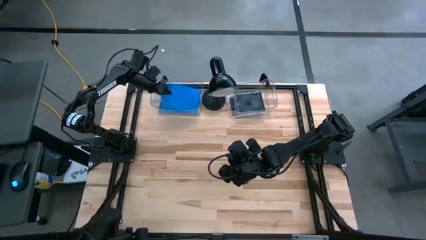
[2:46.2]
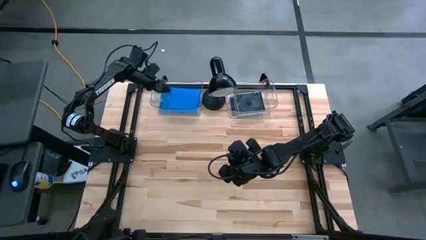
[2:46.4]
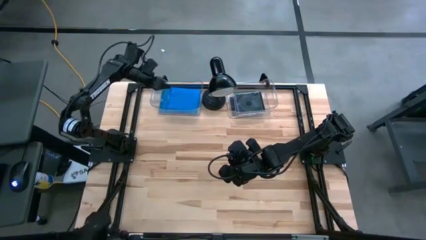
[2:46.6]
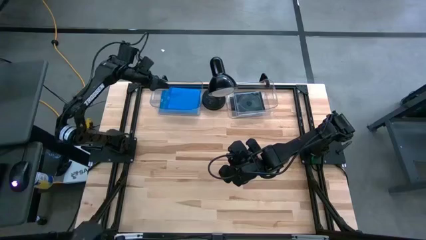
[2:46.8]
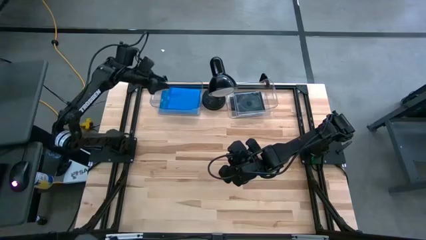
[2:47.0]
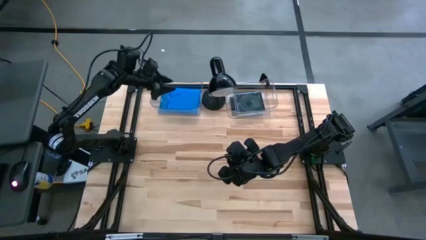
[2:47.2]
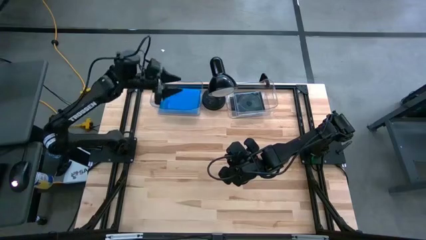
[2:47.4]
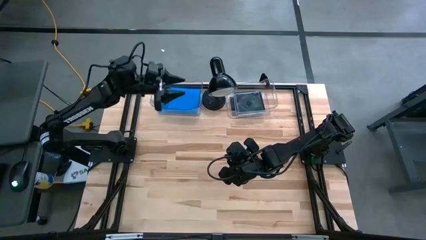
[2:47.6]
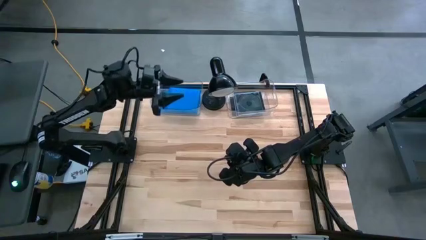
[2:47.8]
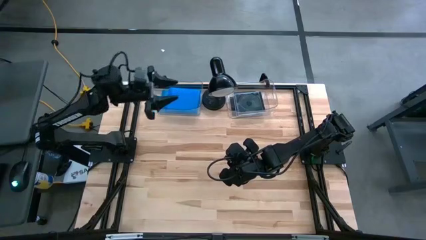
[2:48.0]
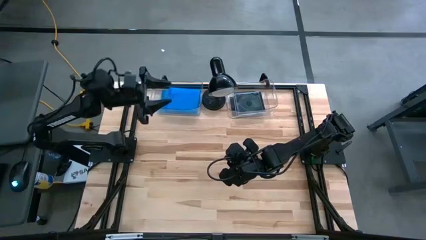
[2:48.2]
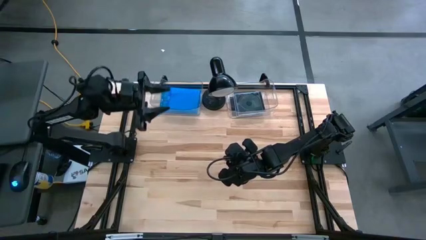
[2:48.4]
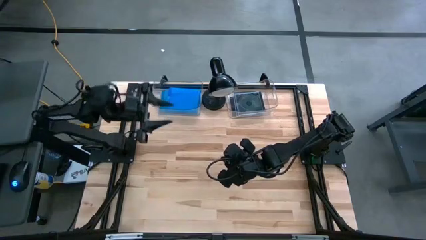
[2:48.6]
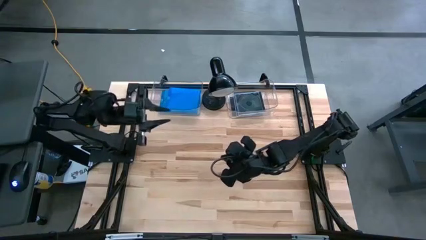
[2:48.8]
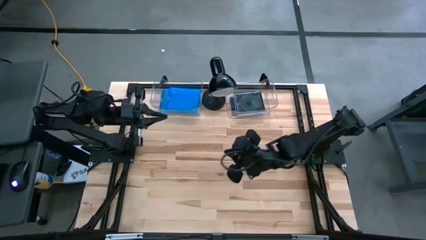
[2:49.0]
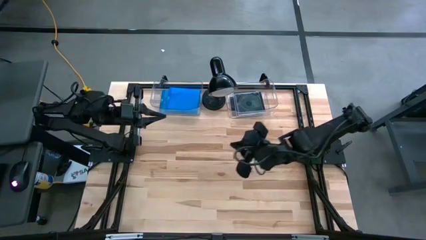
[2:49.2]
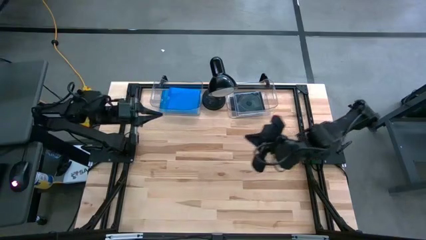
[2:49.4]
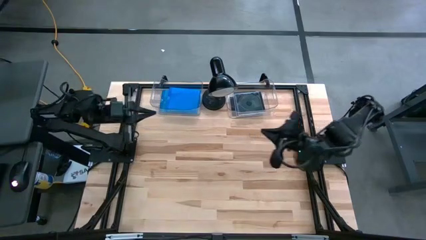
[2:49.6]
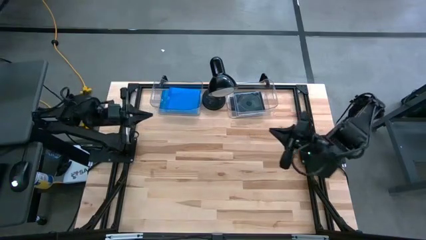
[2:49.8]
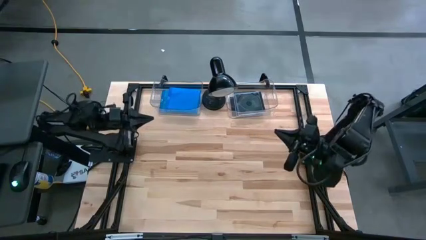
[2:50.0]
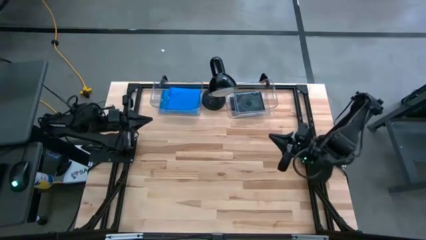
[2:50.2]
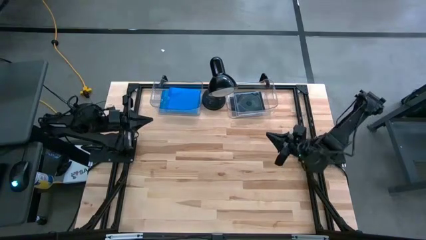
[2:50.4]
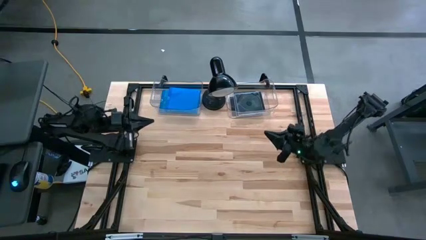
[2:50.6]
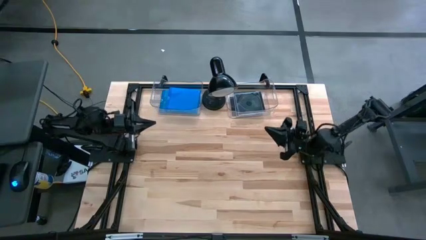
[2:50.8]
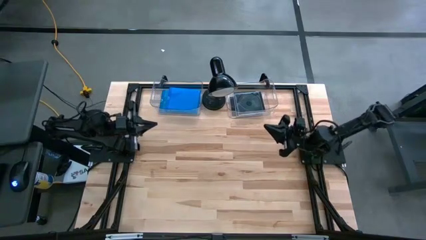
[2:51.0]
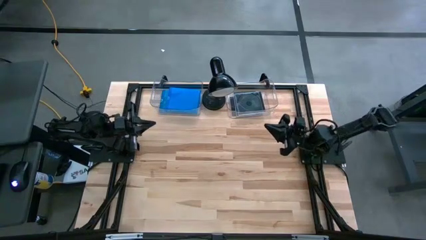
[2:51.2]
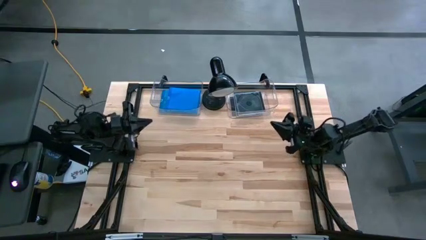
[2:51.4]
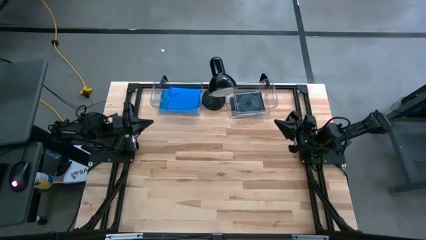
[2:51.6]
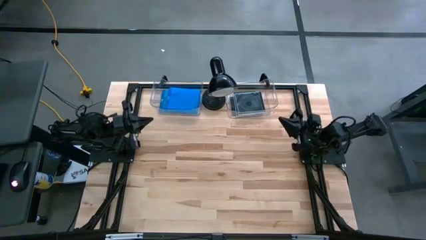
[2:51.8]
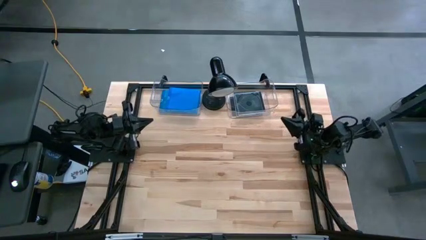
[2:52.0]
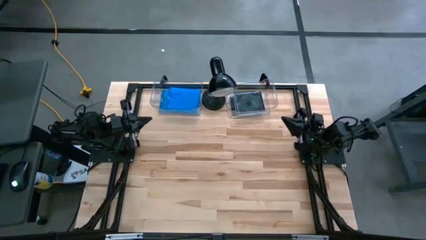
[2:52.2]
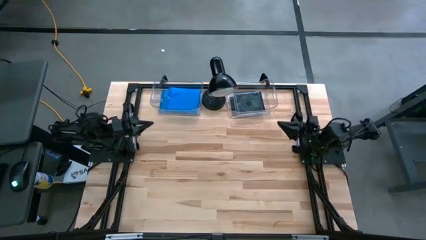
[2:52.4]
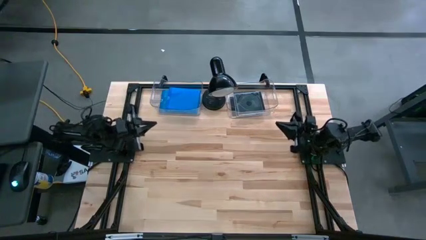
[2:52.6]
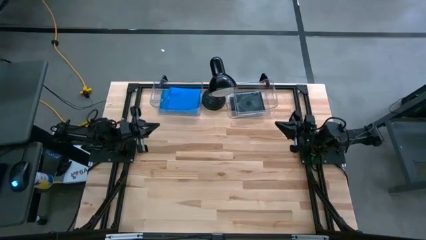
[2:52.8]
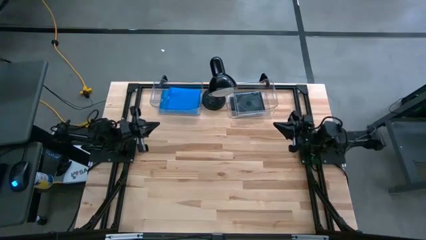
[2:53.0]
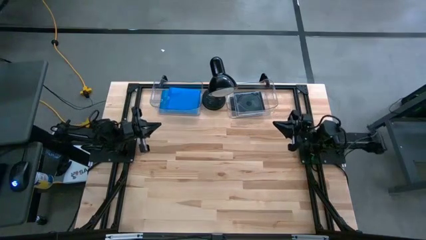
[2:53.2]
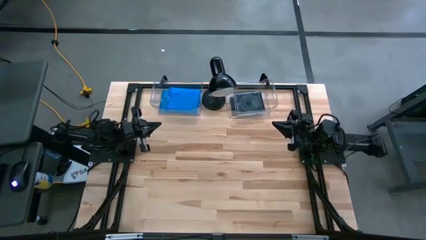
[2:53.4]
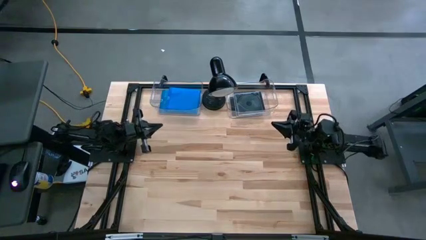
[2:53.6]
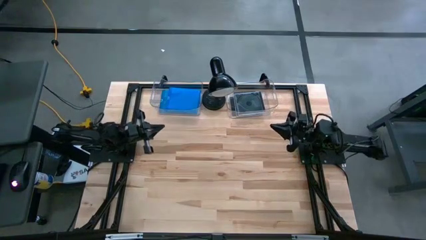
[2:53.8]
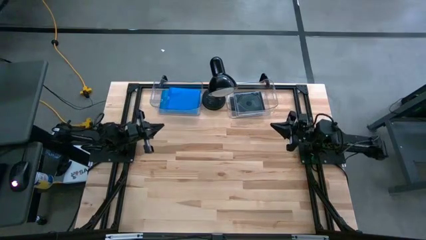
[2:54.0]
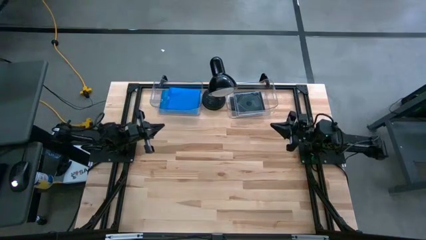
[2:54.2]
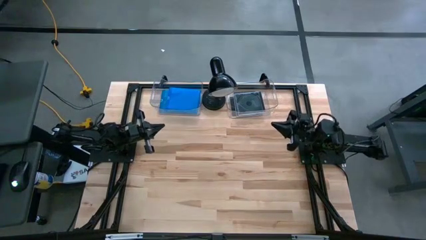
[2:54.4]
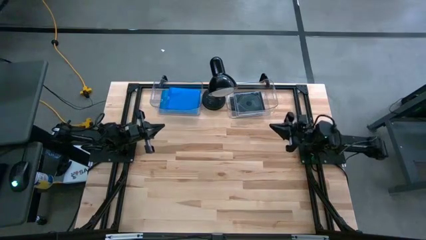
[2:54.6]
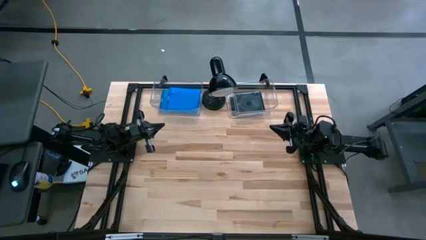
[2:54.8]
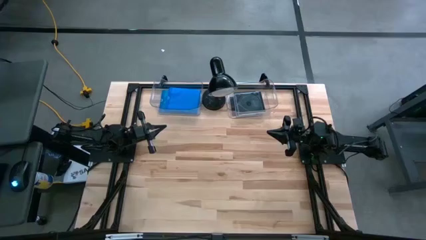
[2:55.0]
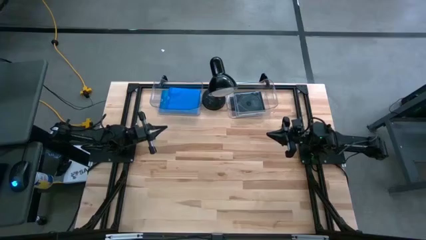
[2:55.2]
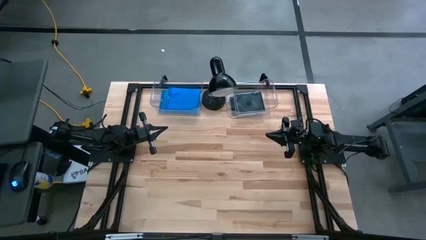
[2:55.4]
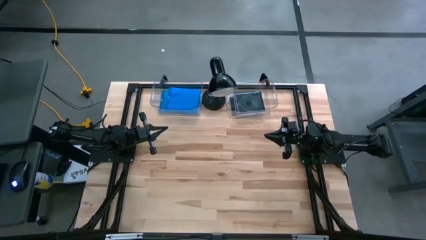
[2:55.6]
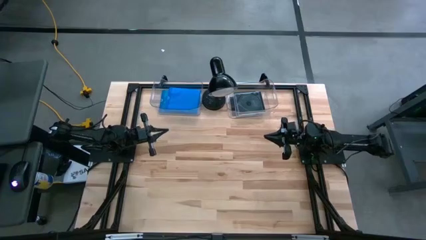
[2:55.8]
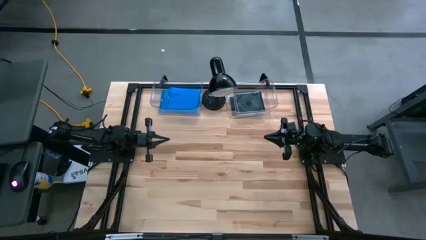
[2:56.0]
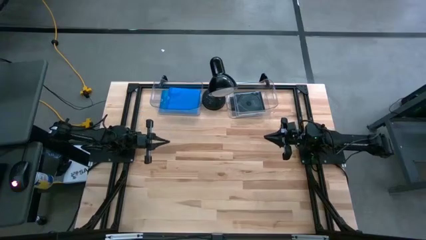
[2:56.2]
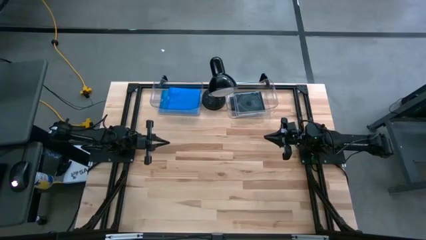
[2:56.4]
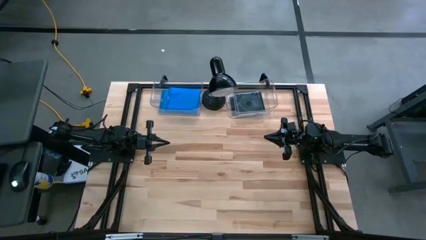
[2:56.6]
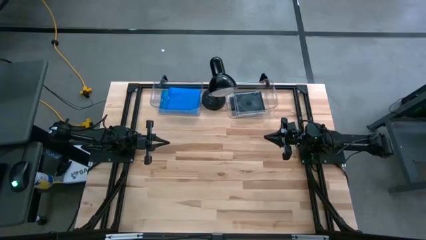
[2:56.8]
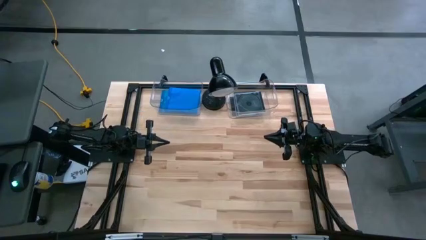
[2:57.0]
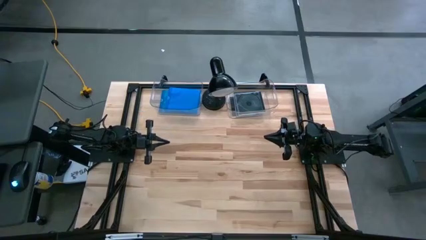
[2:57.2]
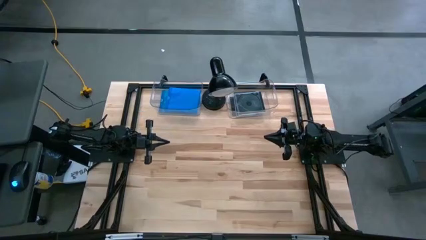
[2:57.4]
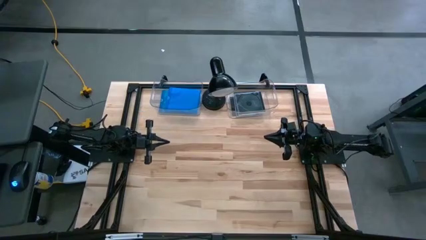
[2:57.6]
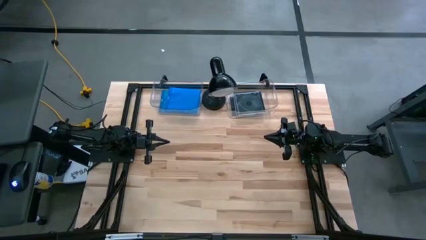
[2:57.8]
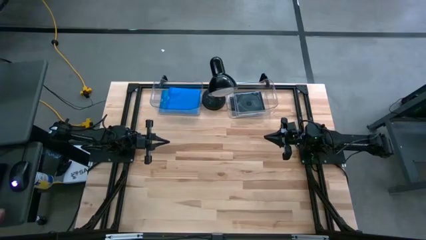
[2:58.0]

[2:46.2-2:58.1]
Task: Pick & place jewel cases by type
Return to Home Position

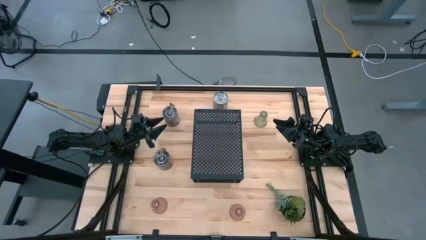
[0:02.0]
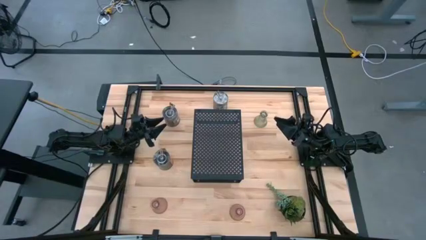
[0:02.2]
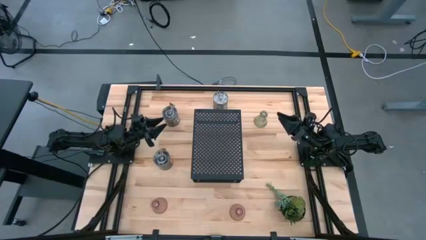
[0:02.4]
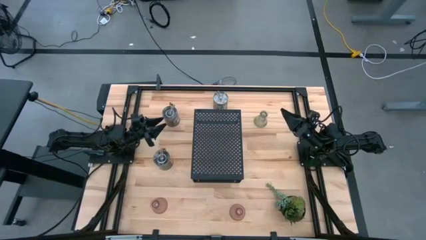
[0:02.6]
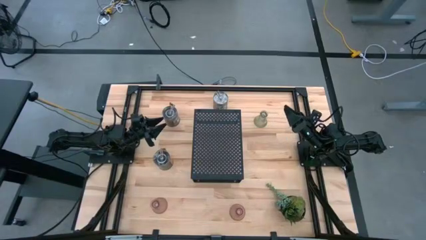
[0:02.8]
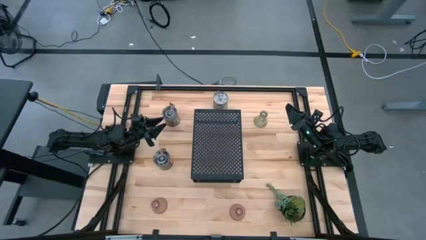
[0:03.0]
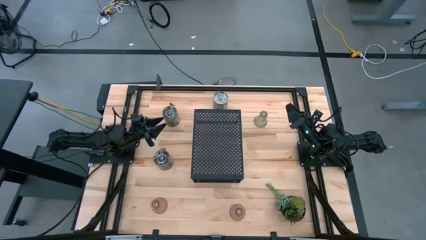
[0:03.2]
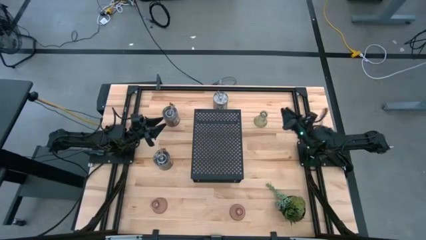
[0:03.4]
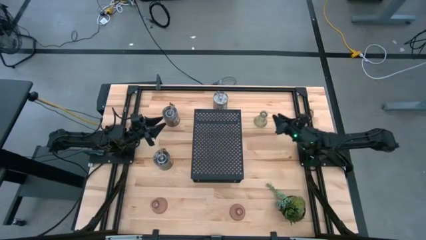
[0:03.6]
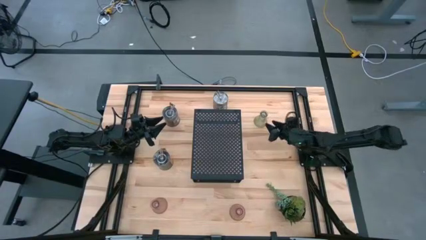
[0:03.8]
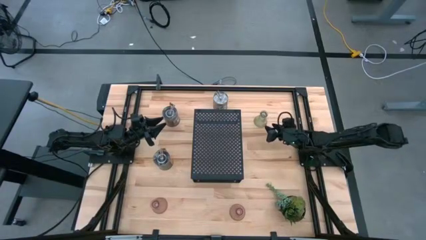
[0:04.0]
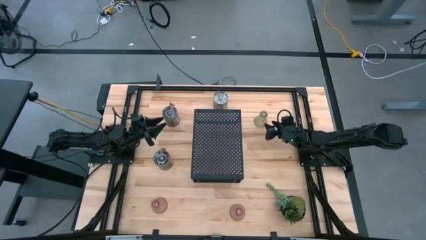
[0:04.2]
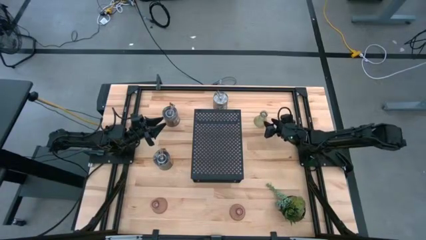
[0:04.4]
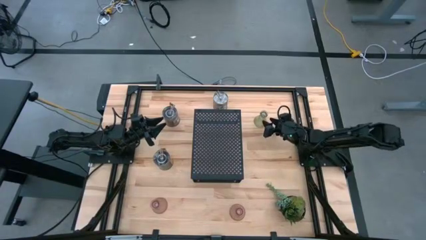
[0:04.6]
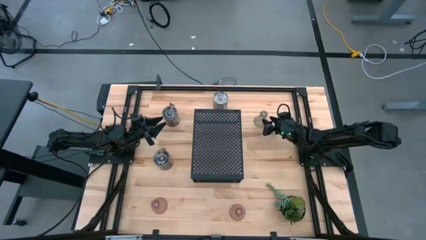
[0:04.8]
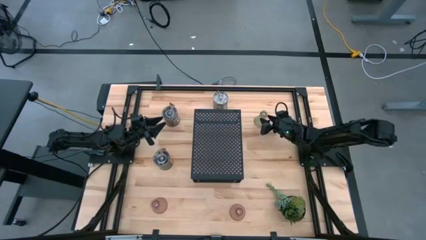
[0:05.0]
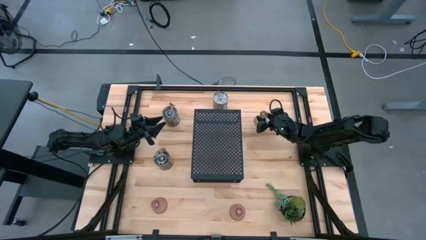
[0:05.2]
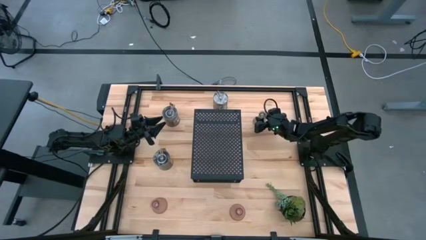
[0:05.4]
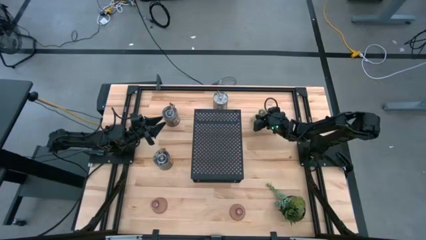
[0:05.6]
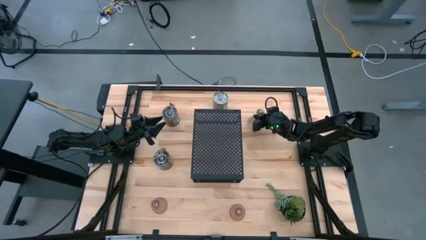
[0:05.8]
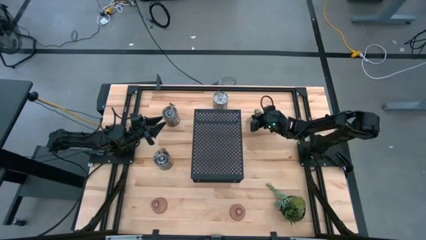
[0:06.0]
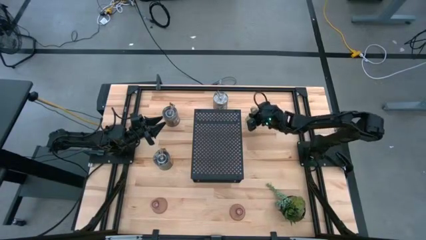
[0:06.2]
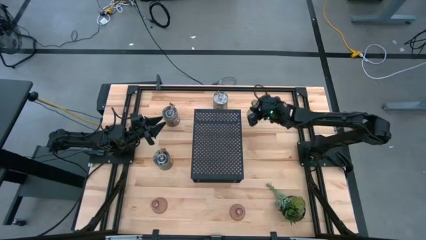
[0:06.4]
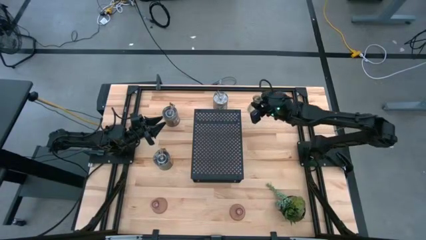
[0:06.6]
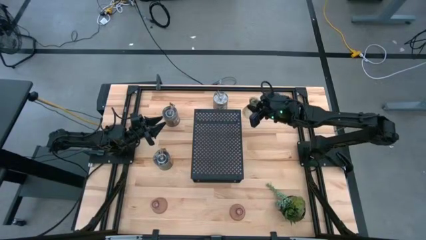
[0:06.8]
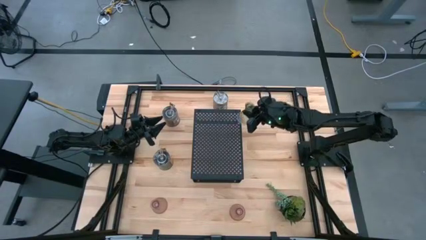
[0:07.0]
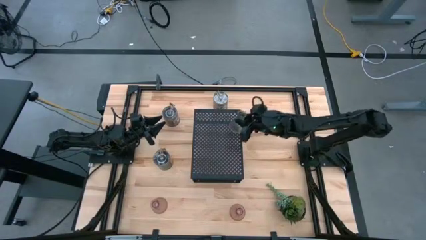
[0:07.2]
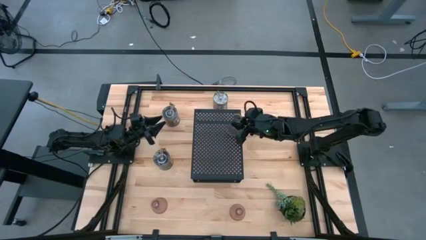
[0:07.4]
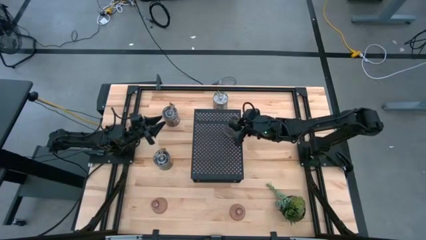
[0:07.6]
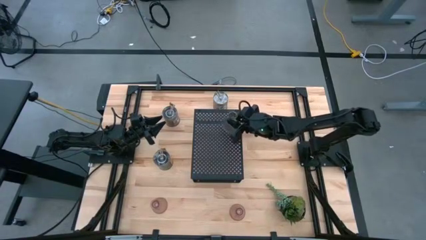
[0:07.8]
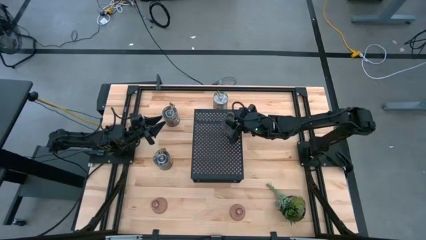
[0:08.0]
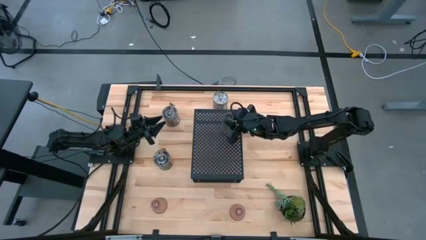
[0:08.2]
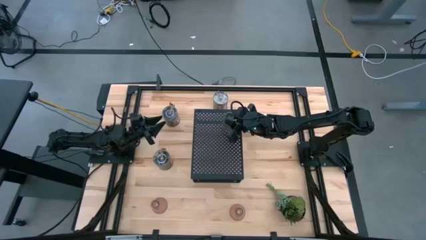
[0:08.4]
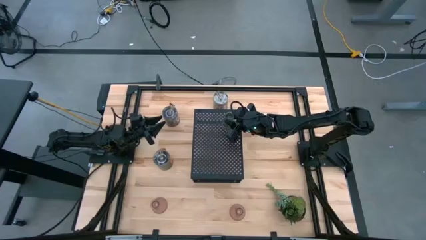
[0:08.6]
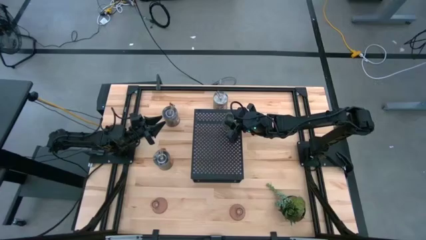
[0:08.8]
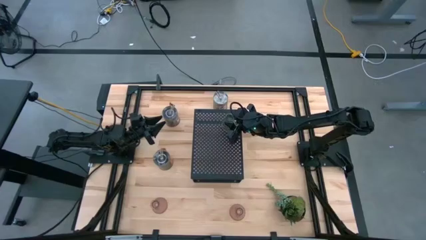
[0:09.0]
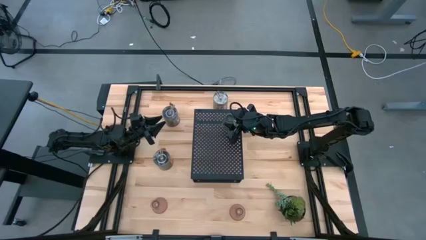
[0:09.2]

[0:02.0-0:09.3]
Task: Pick & Place candle stick holders
Put the green glass candle holder on the shelf
